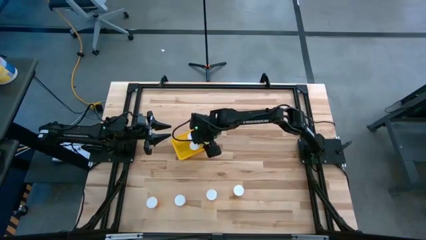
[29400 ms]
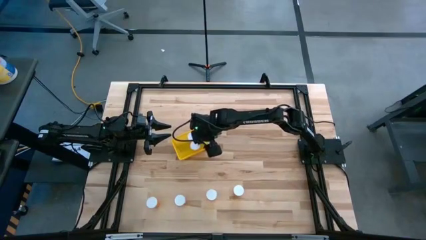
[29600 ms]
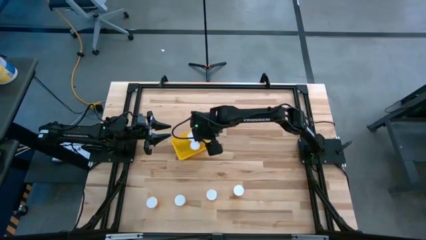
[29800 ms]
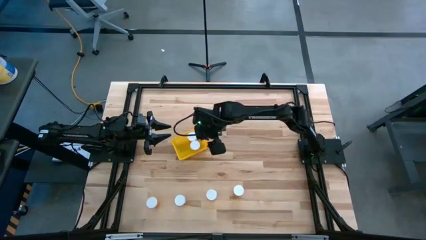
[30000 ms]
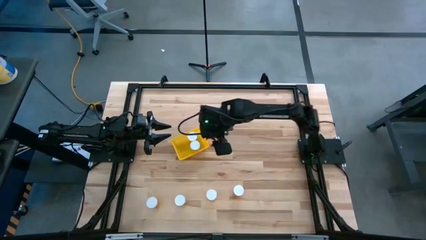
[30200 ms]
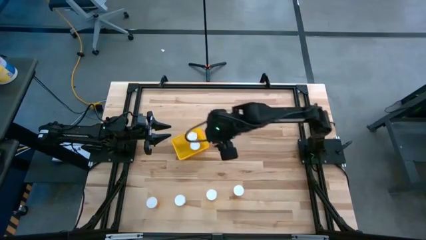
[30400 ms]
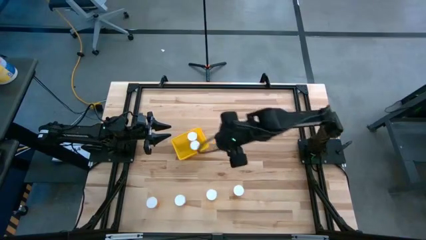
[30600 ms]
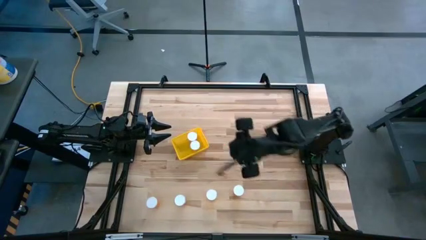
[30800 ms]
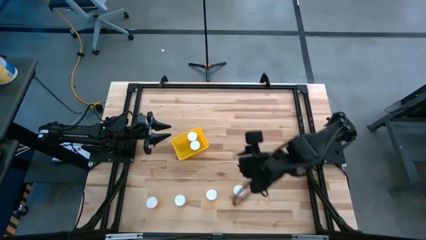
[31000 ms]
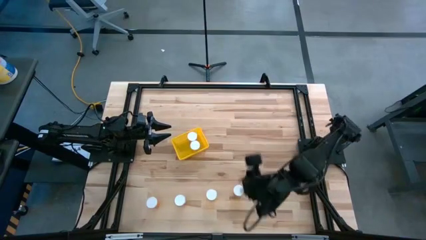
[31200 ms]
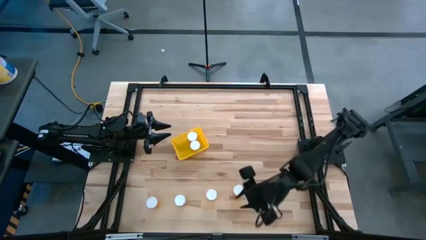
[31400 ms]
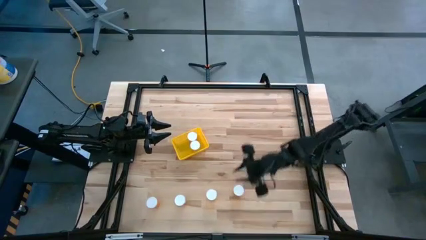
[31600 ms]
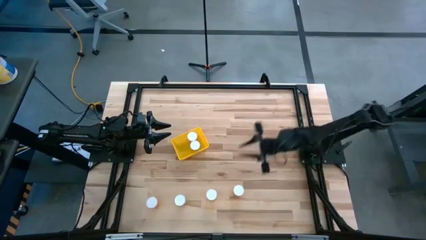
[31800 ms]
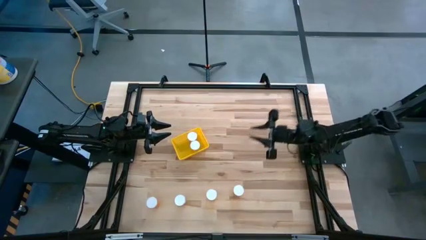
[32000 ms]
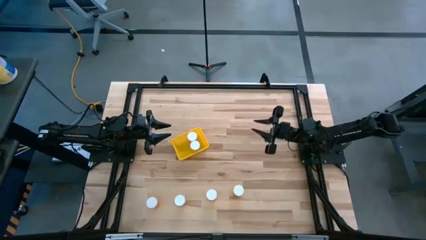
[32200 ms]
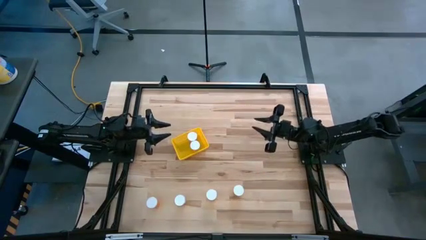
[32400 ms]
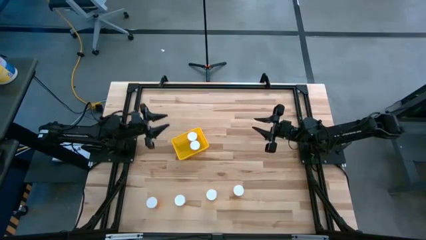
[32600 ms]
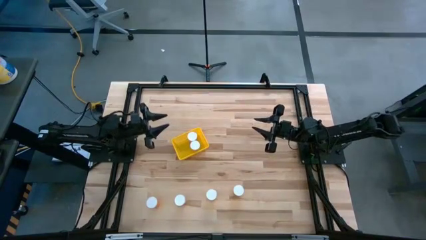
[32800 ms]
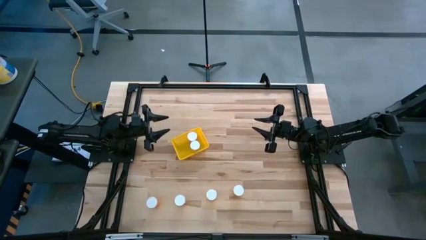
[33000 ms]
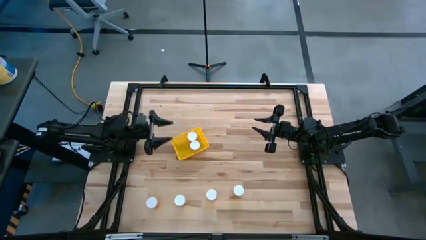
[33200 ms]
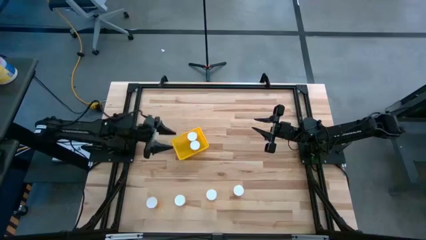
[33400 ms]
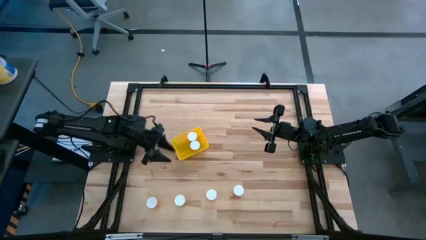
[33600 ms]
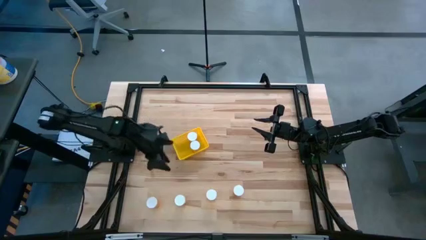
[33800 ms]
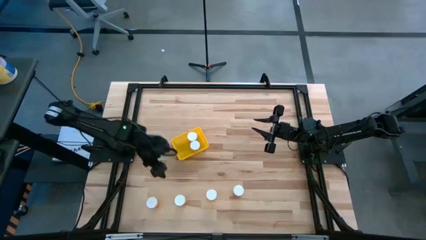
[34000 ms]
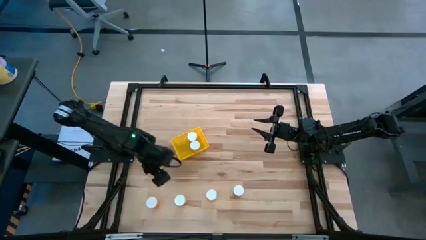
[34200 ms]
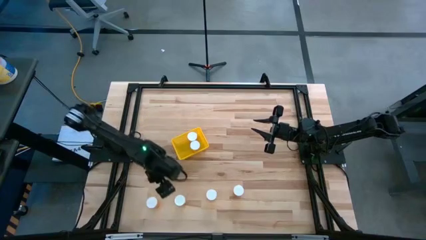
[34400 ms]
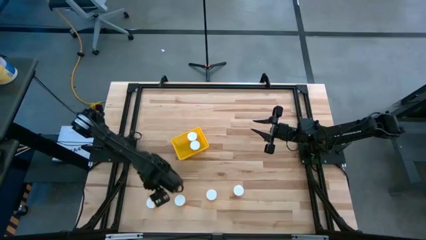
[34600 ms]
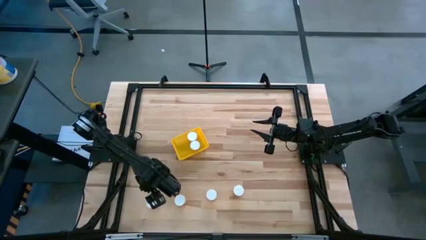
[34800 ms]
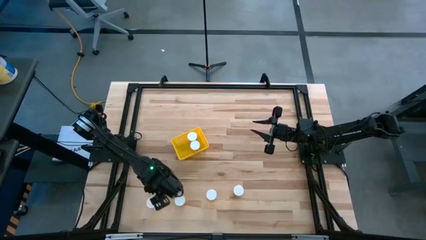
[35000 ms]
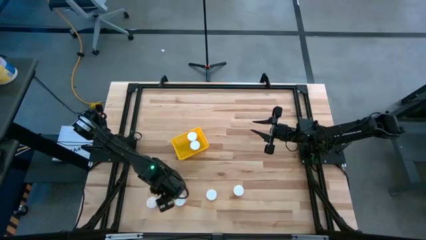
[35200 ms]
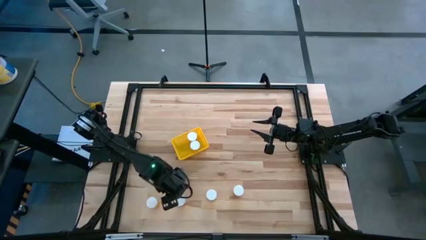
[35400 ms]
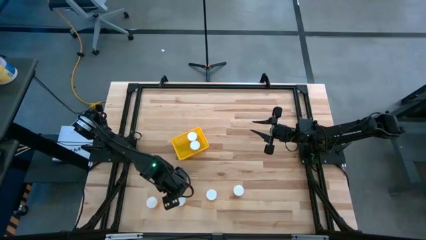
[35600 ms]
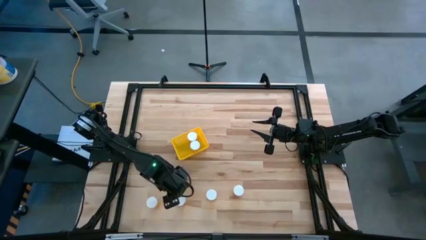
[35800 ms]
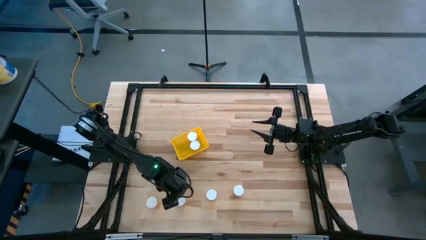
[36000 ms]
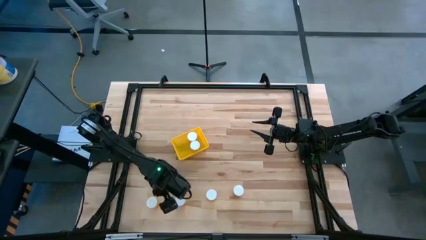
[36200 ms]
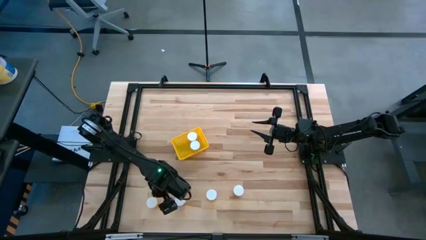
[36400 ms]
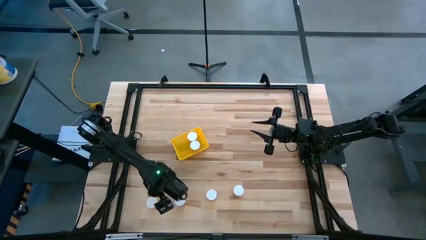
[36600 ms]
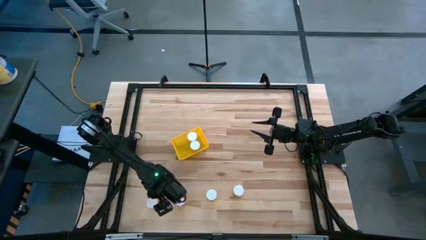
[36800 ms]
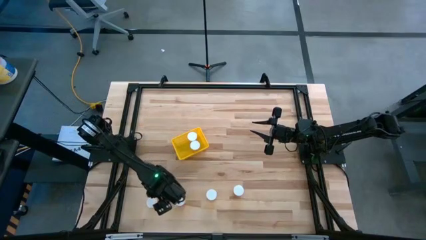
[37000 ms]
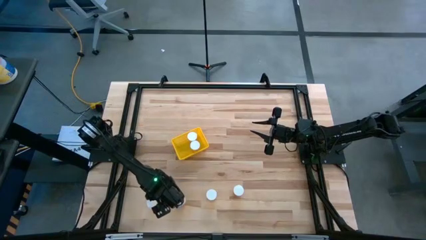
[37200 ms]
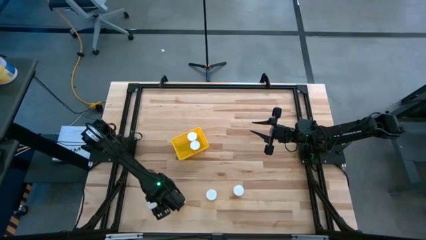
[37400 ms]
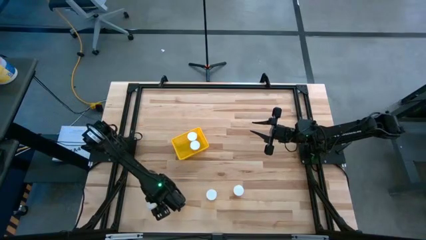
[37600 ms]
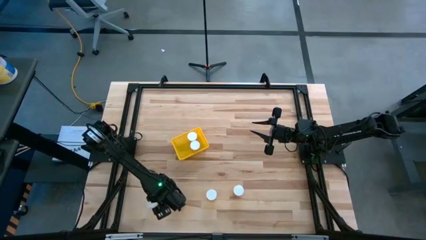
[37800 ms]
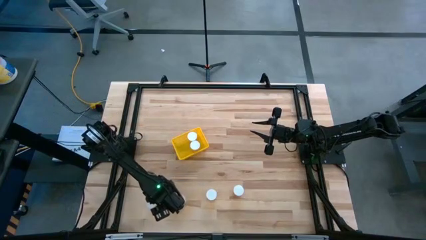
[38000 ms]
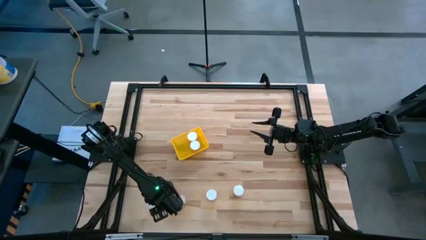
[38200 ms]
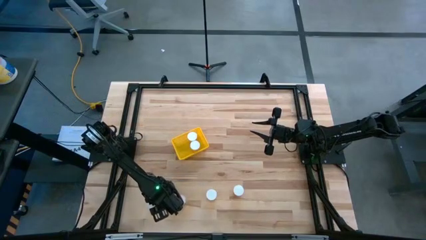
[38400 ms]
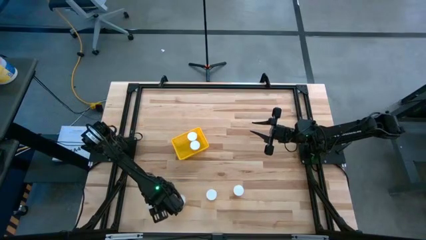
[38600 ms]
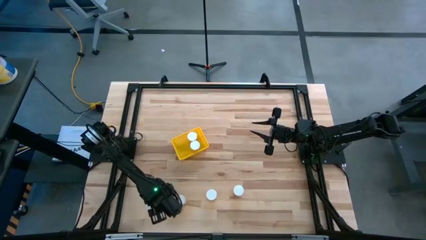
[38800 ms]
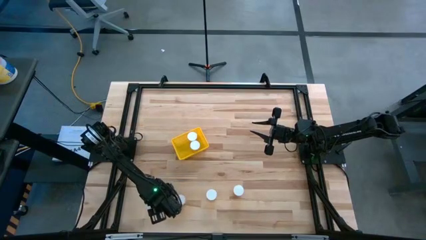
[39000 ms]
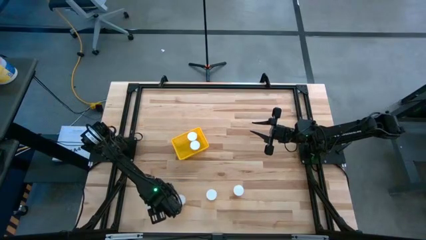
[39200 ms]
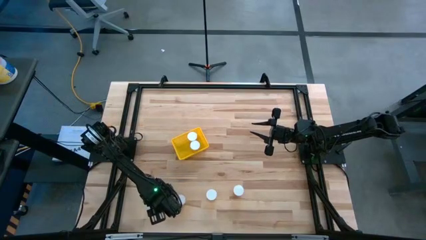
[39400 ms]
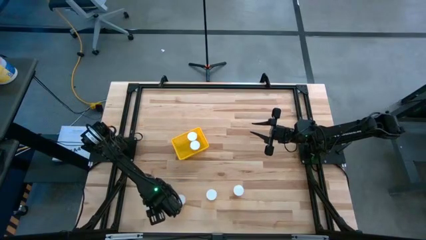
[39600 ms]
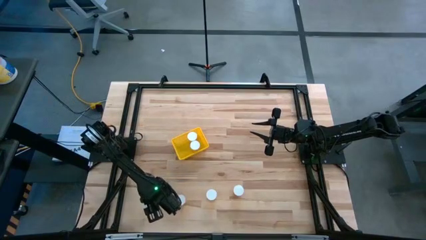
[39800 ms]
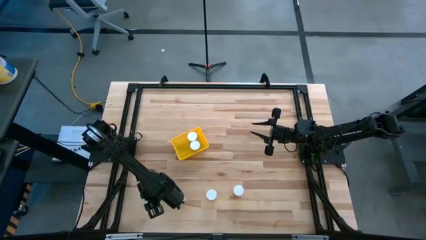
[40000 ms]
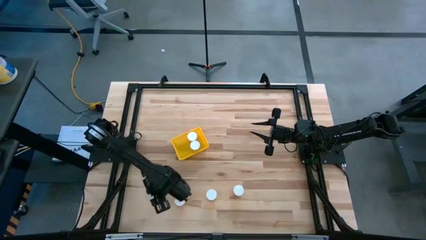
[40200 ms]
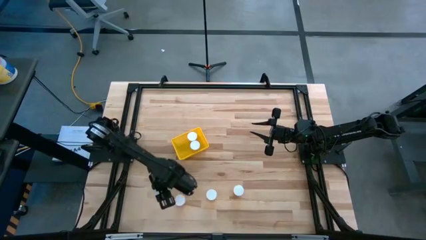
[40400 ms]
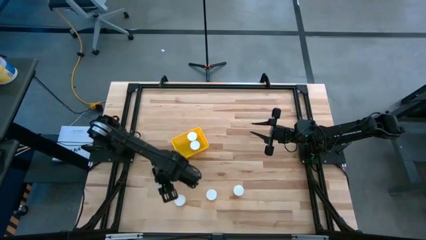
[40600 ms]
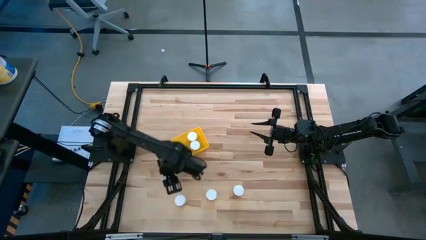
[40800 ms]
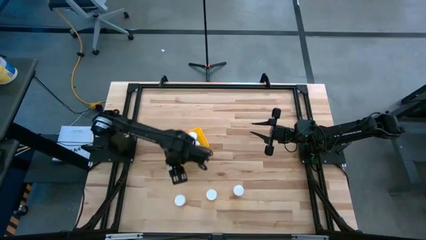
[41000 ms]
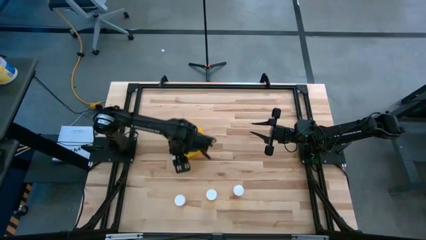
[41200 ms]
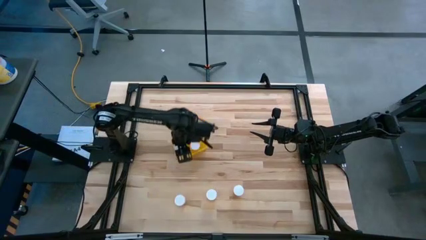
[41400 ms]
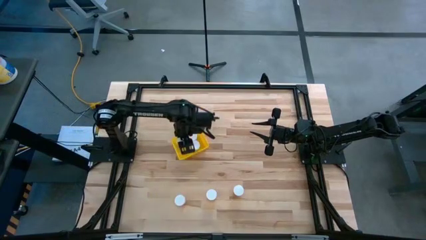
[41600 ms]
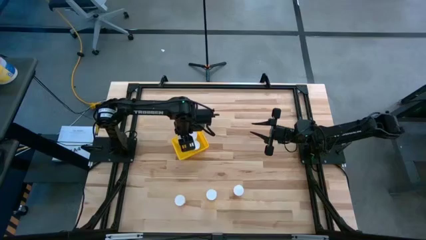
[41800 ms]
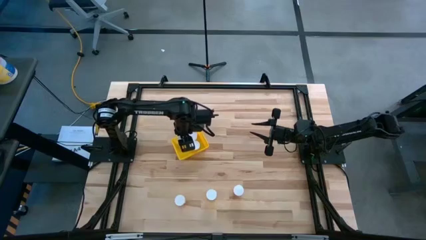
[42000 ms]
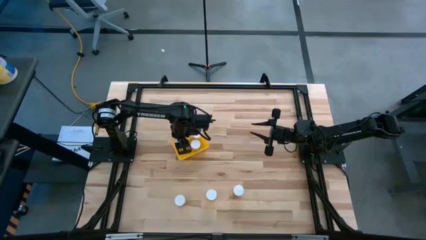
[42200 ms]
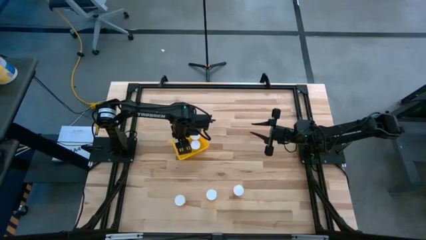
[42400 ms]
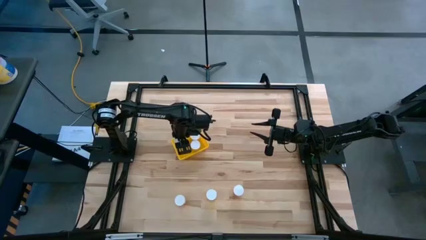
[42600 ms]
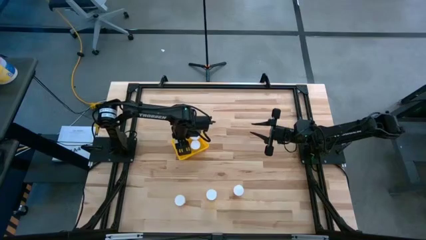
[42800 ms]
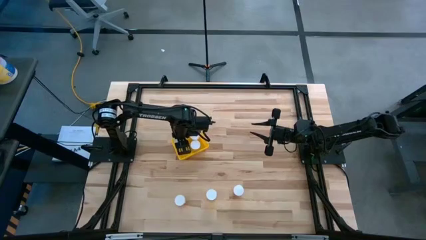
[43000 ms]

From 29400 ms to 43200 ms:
Task: Pick and place pill bottles into a basket
Put the orange pill bottle into the yellow basket
